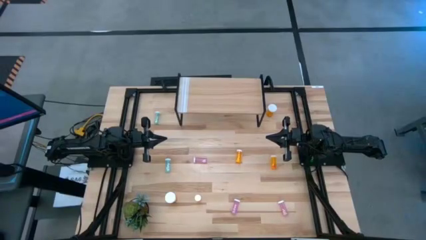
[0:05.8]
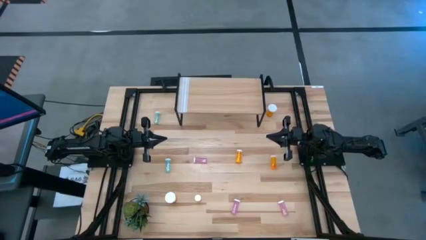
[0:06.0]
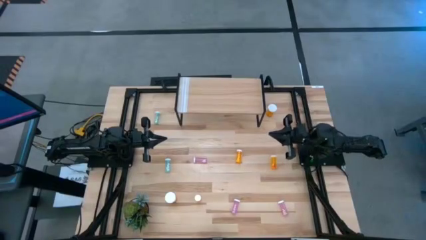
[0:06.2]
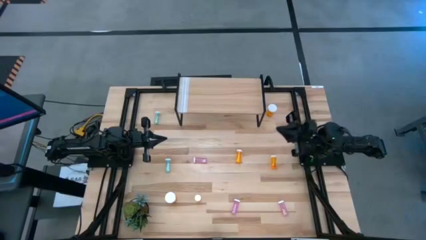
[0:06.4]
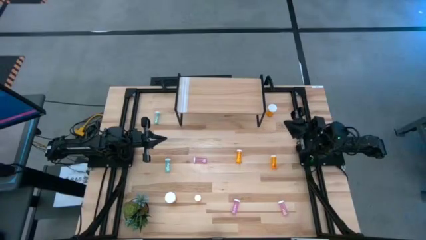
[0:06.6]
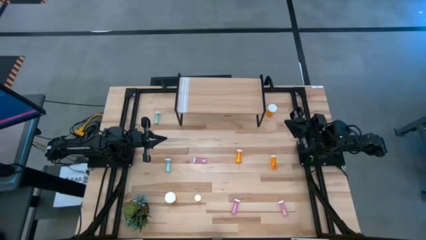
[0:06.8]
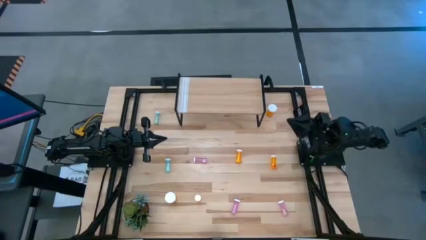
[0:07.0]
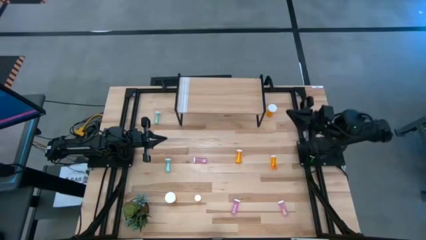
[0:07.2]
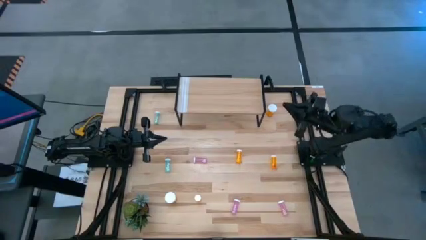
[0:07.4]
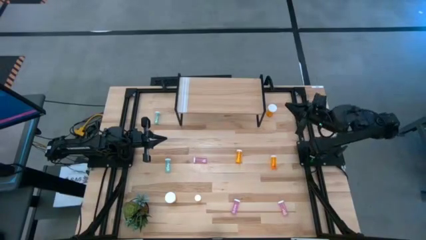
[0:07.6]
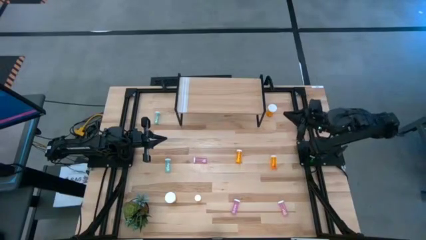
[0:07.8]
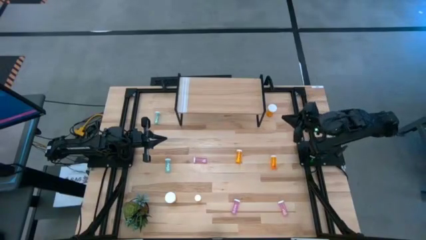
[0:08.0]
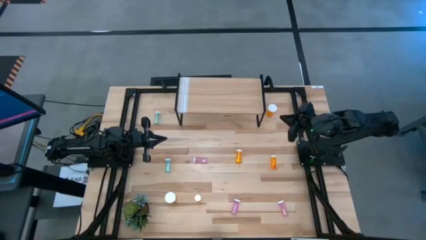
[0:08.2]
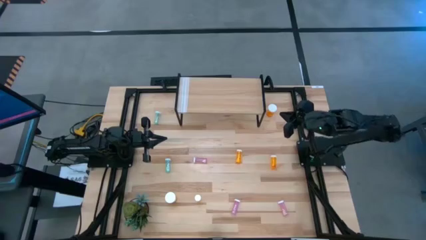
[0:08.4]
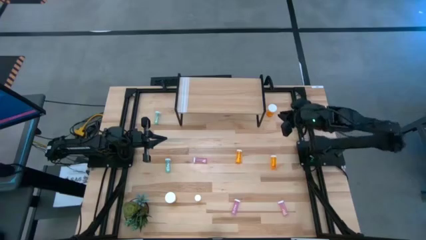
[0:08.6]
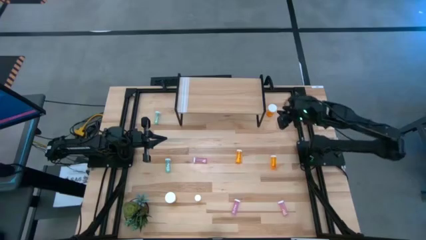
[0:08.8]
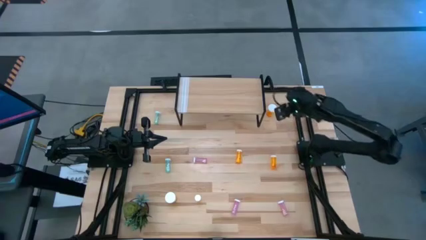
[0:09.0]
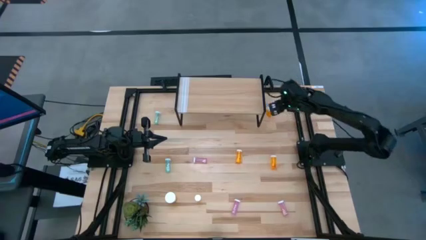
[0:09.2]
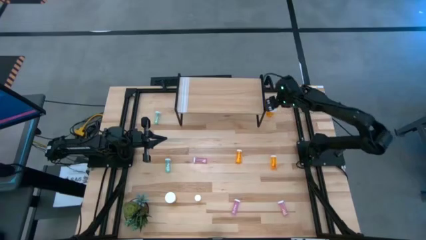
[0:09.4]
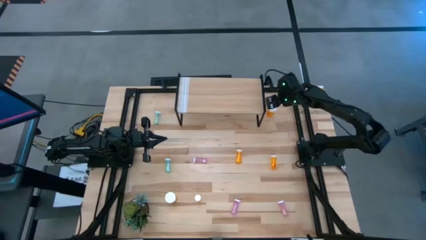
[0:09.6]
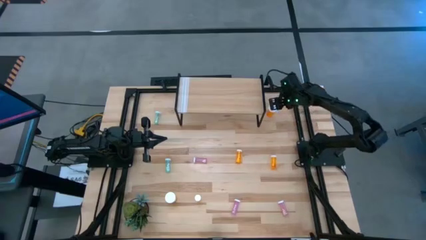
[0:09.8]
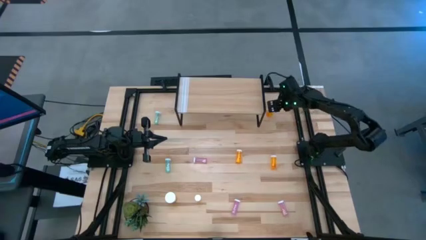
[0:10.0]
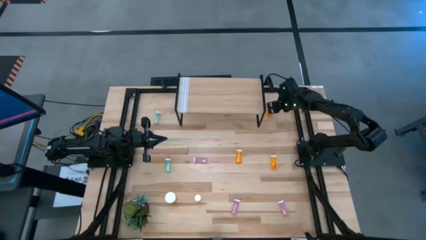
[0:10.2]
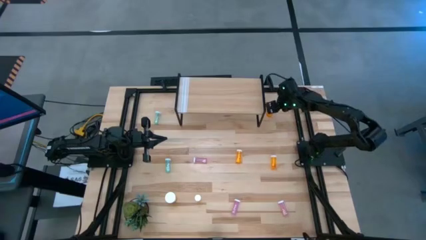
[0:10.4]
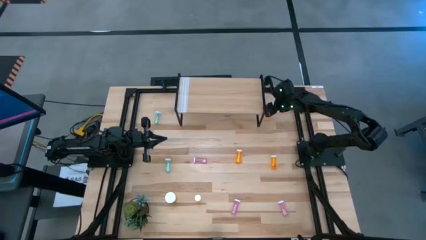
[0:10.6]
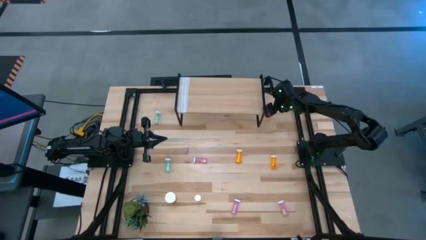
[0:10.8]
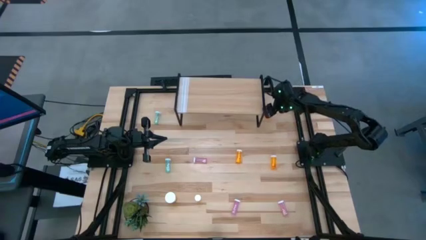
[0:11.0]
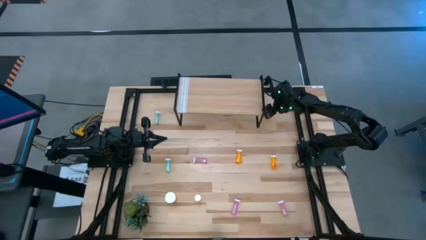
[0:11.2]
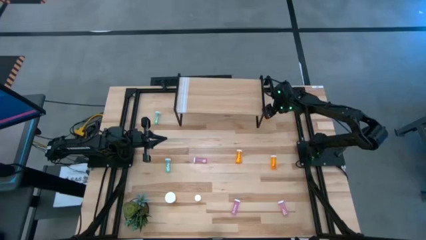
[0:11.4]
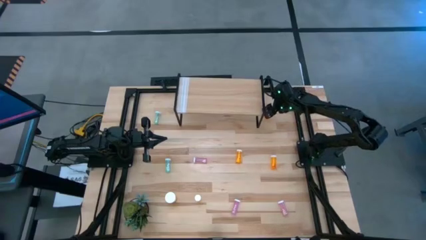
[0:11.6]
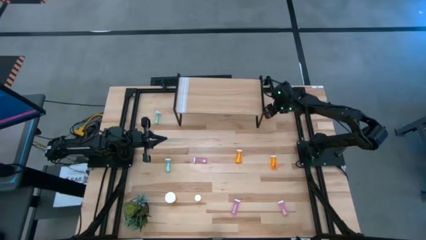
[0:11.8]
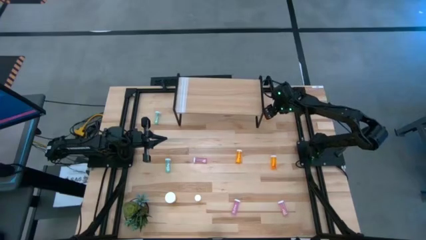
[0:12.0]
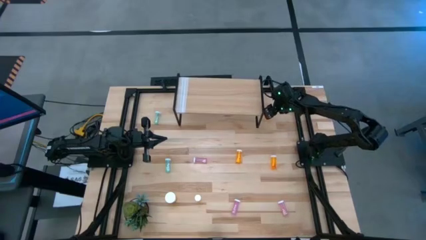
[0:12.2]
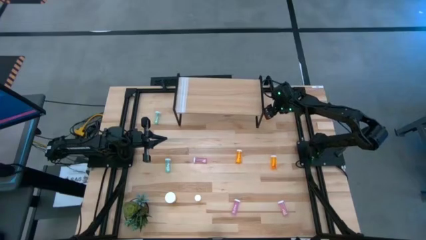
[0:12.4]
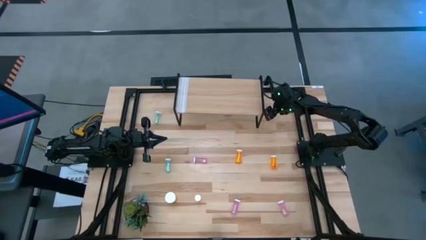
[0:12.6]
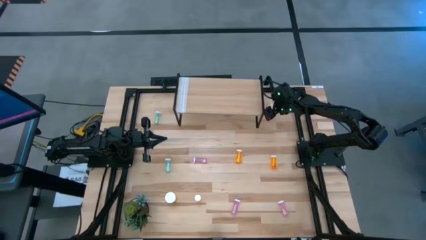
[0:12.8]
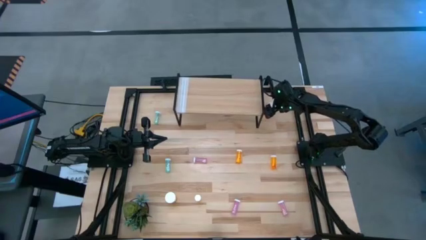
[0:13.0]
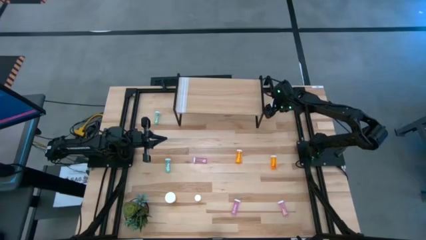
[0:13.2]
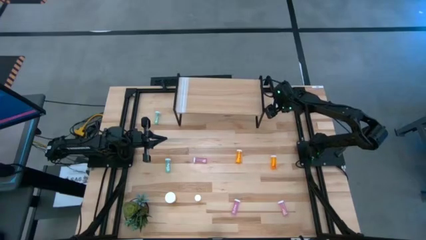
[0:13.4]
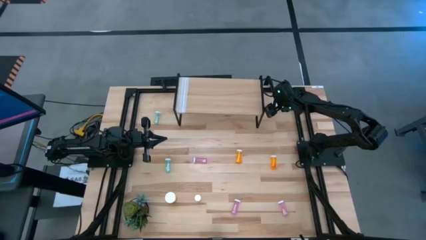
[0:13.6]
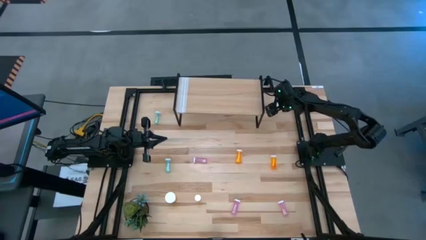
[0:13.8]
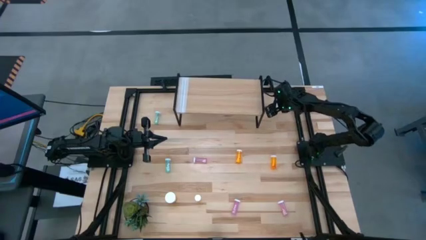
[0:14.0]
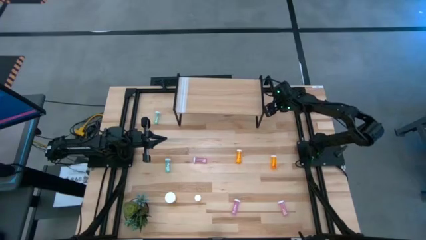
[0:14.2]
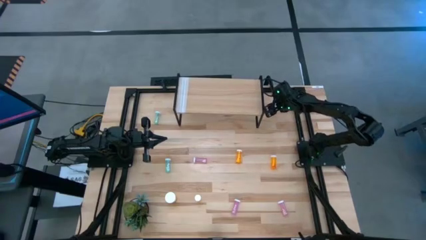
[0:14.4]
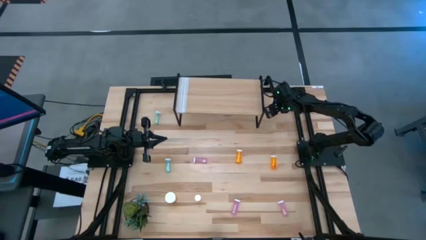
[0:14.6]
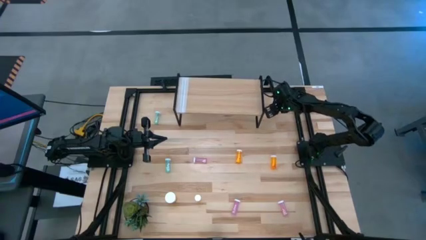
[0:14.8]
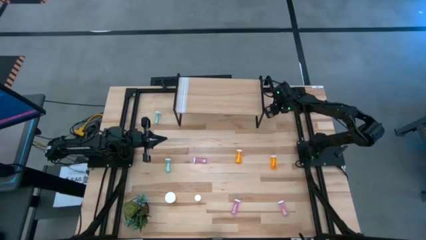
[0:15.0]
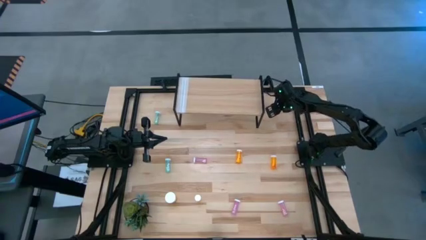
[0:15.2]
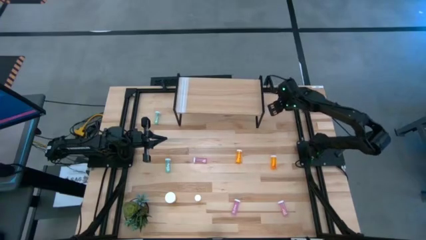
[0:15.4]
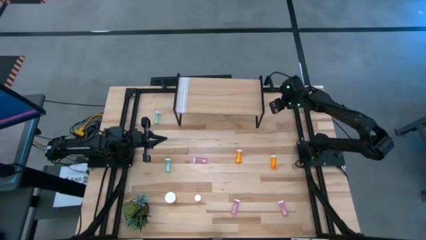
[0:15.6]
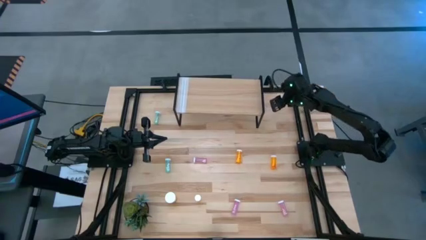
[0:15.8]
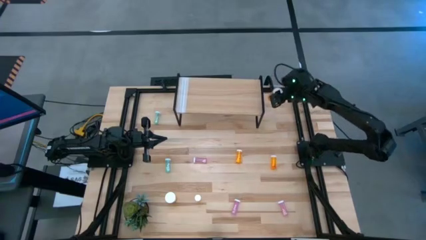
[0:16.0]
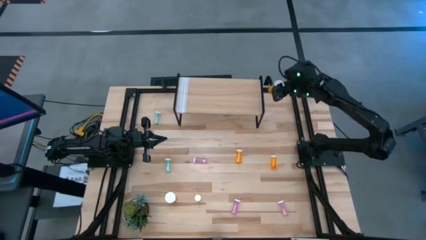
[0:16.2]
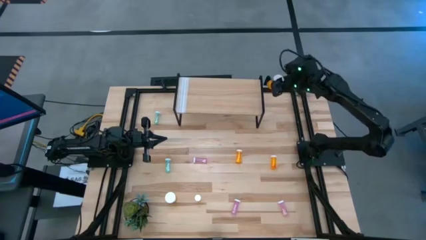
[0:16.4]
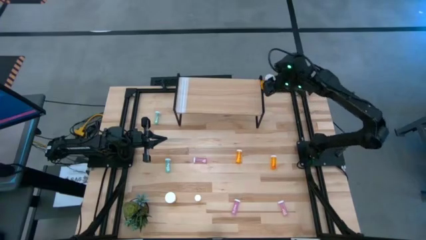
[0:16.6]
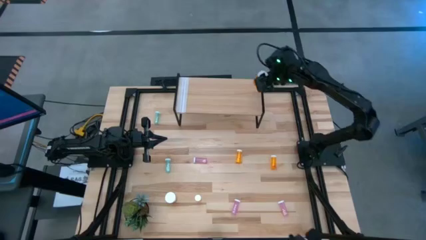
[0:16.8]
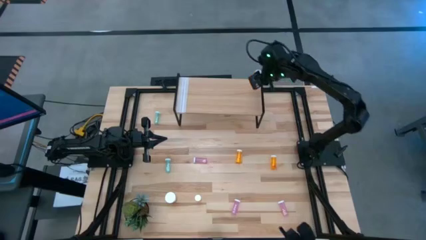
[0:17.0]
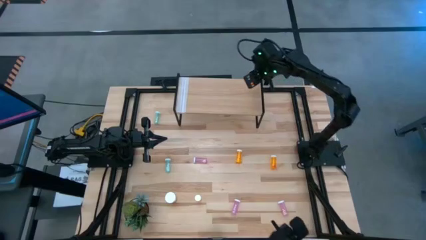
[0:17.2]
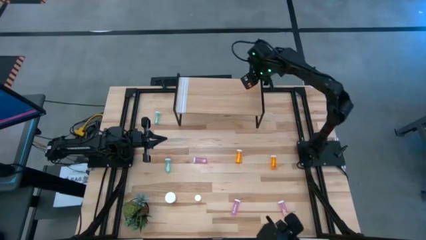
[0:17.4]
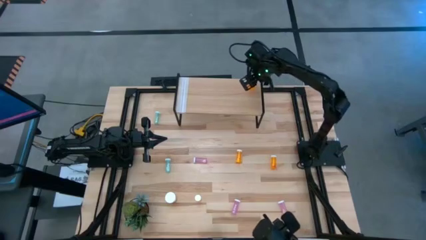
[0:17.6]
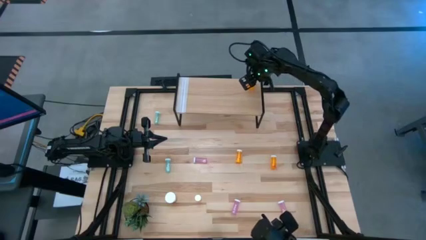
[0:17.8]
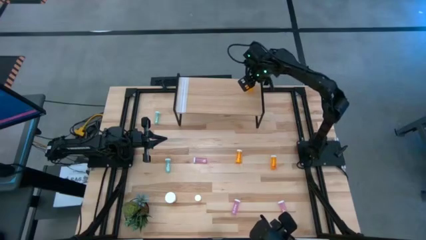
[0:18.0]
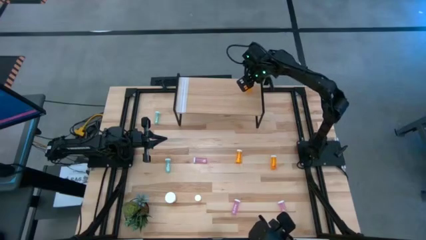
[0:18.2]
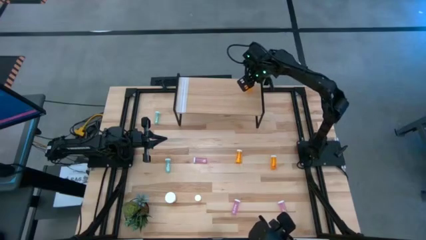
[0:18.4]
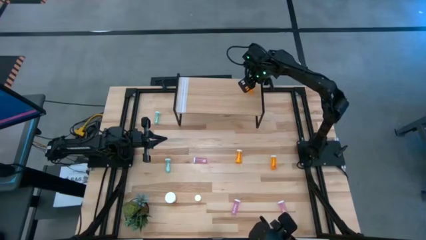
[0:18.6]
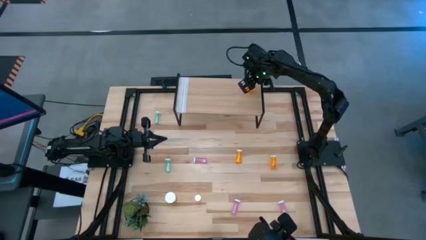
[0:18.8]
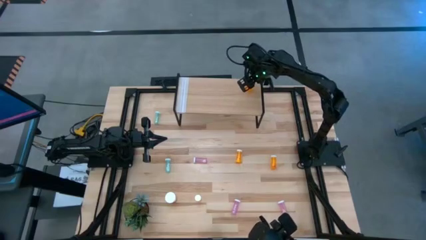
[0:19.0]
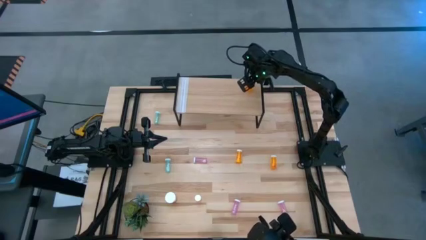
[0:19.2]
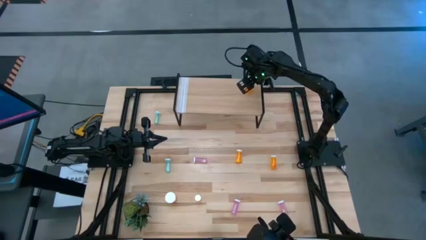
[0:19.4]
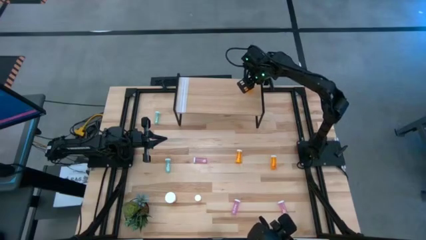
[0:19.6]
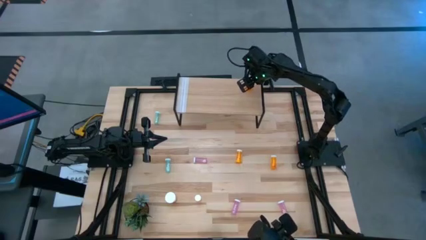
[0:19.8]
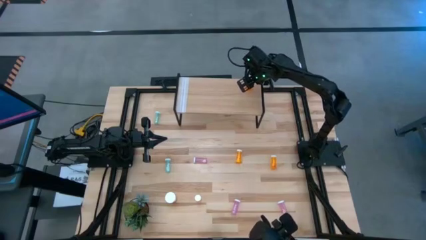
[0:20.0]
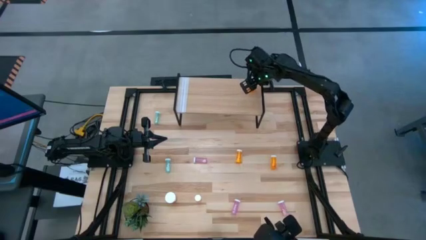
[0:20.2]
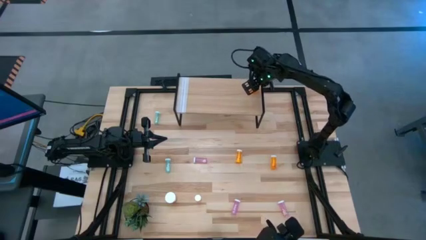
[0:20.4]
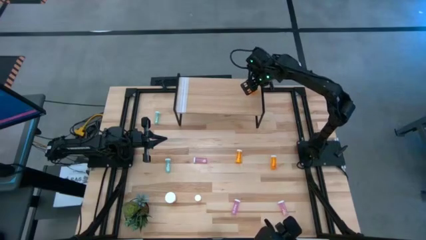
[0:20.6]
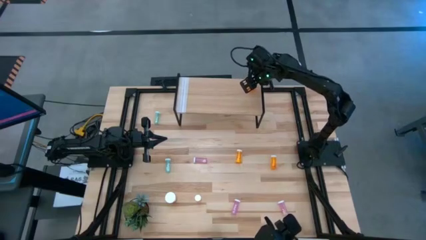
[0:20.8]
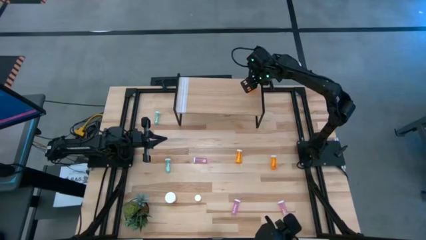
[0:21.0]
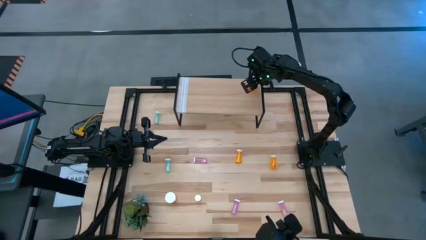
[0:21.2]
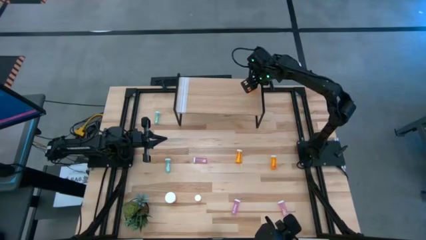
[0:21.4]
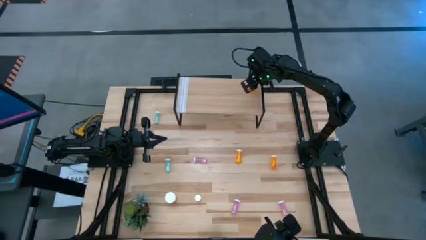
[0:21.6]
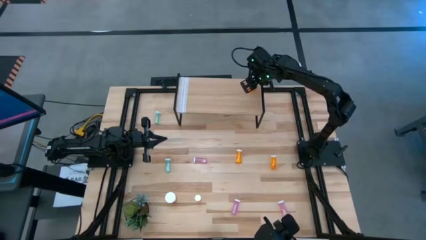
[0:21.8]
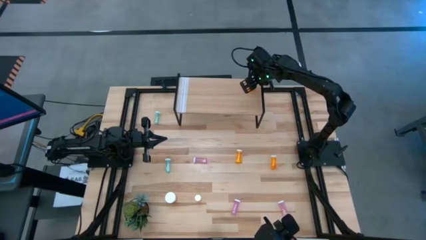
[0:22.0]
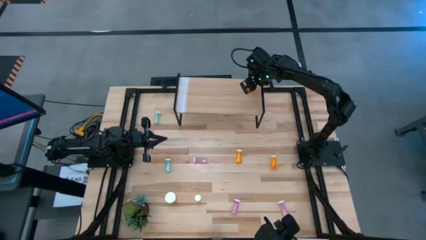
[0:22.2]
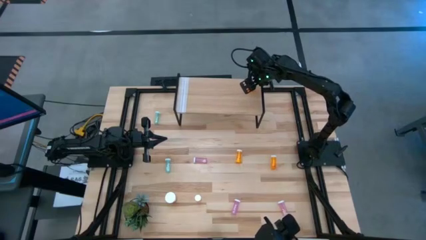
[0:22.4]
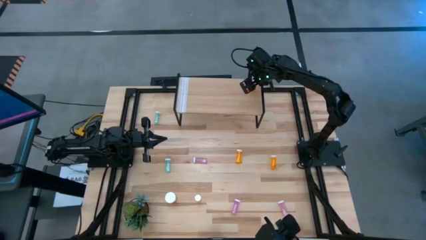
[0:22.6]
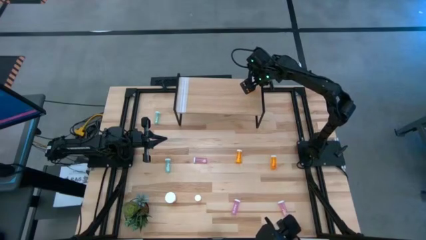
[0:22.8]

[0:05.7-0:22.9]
Task: Pick and place medicine bottles onto shelf by color
Put the top large orange pill bottle on the shelf
